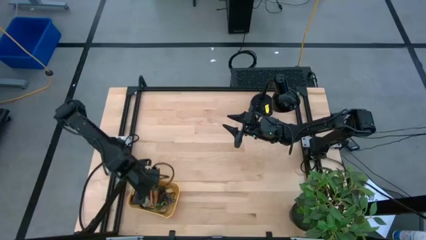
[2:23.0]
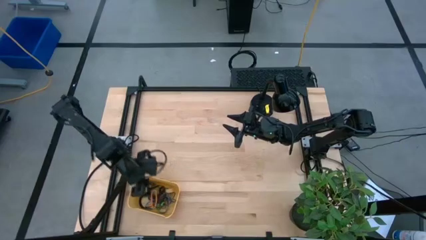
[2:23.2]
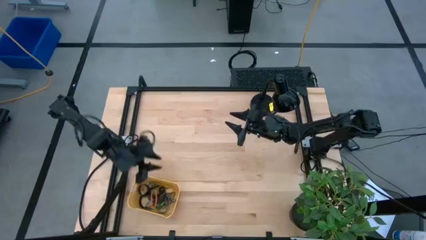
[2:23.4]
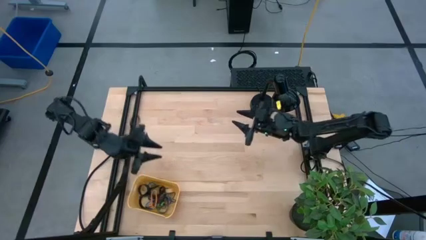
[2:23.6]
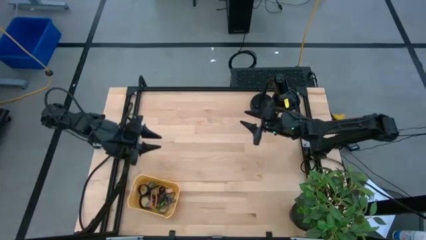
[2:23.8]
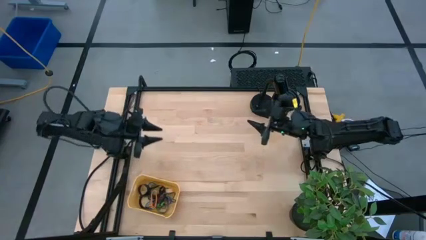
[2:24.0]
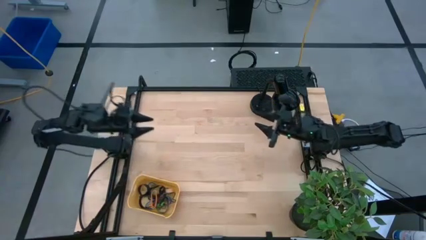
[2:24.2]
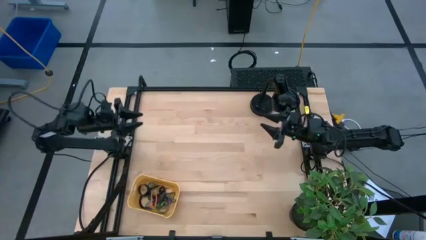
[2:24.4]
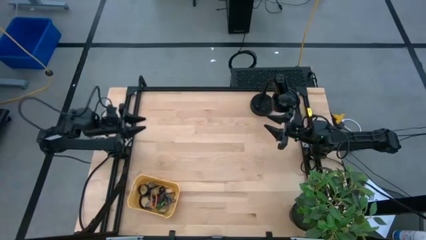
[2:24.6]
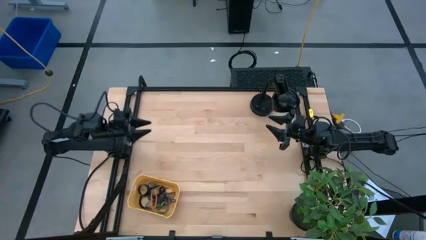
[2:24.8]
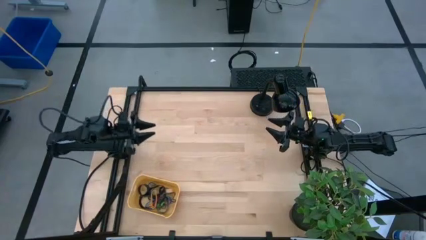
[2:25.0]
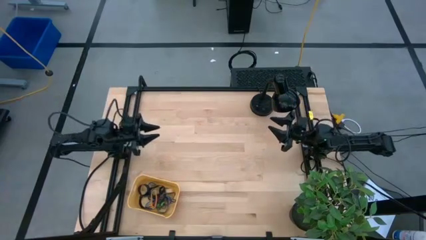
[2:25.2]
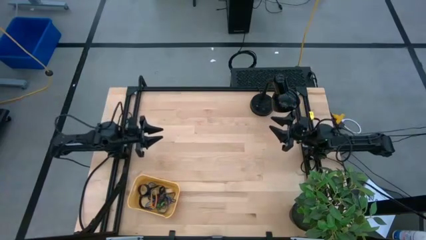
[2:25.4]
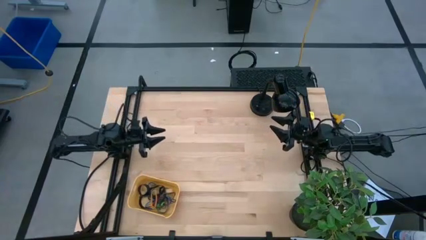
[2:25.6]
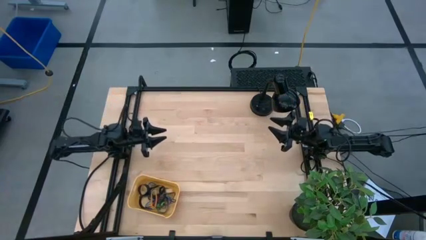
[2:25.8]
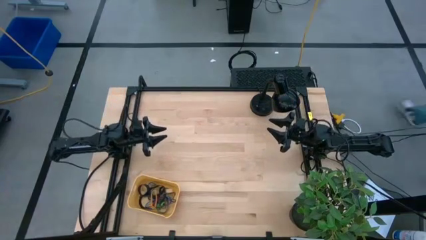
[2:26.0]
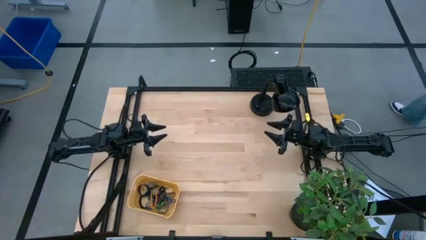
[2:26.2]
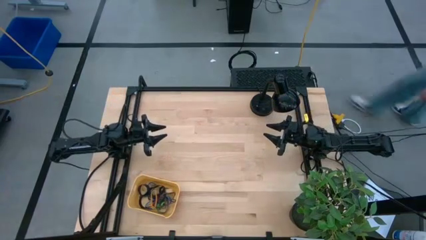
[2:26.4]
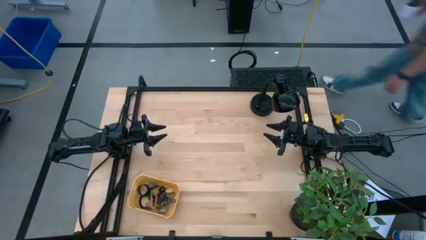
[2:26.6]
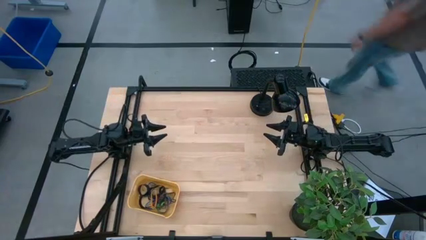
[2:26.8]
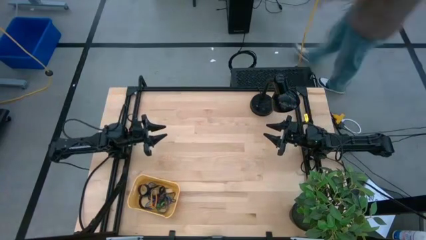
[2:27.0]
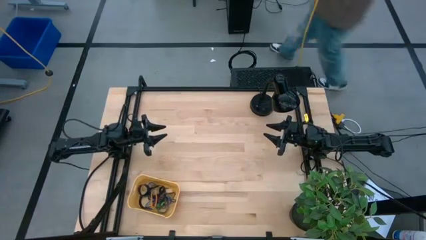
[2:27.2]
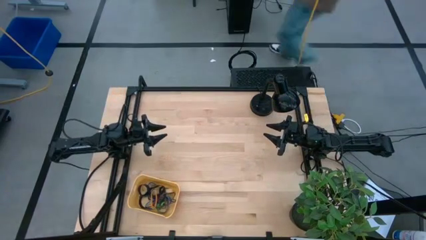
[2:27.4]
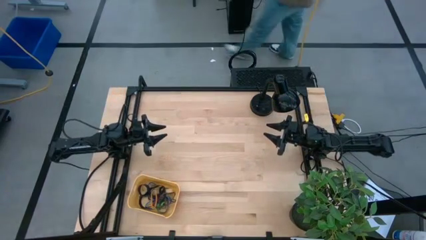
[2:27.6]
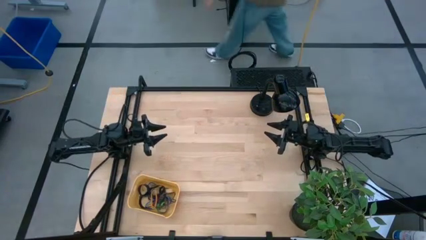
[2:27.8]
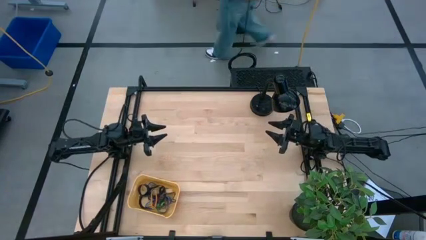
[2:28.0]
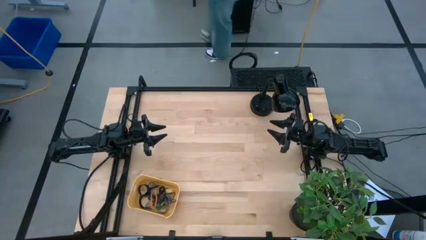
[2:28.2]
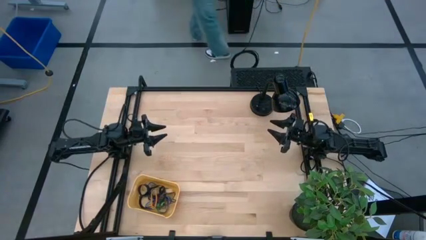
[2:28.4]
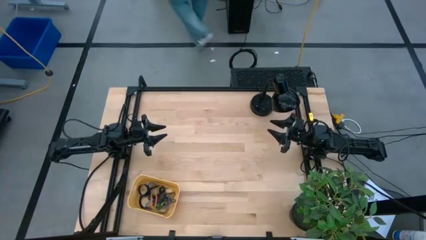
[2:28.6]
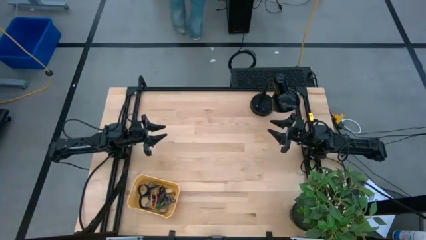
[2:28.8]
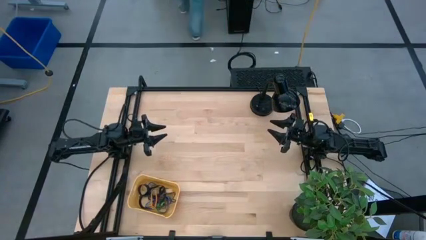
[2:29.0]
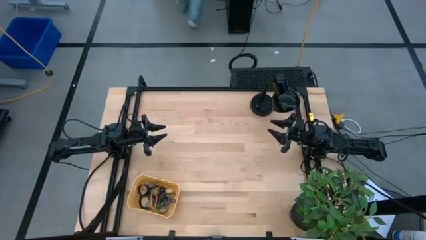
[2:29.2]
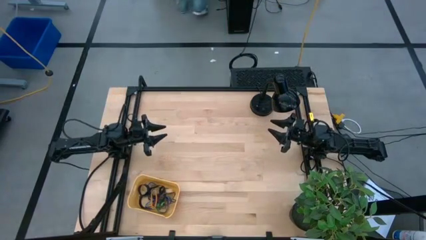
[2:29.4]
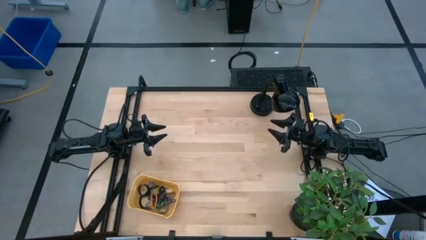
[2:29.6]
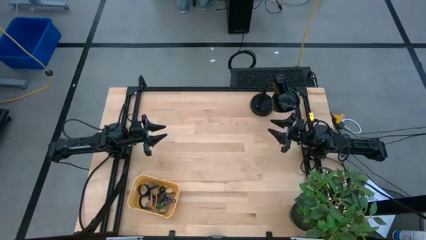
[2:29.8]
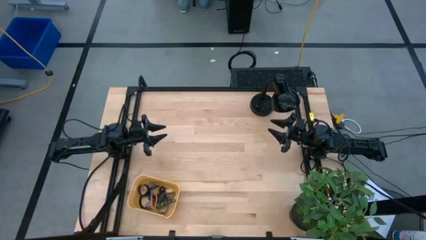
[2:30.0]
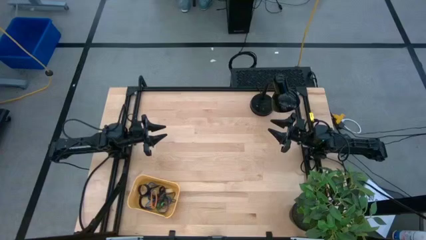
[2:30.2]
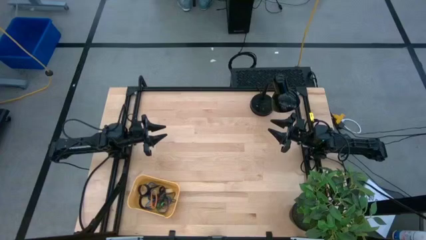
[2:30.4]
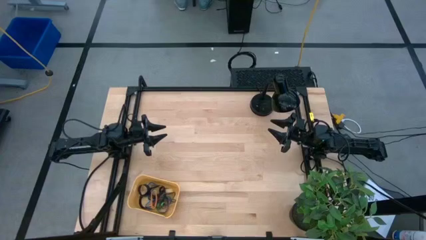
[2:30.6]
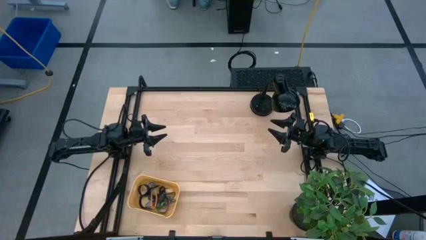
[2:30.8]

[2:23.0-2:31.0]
Task: Pick and place rubber bands into bin
Return to Home Position

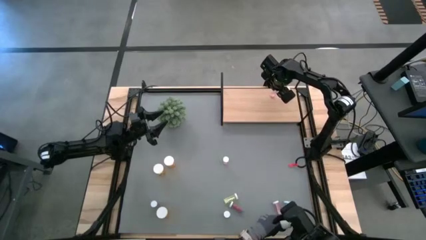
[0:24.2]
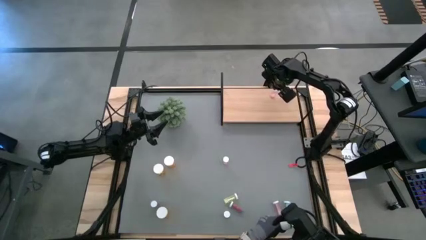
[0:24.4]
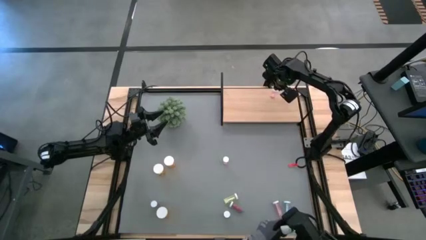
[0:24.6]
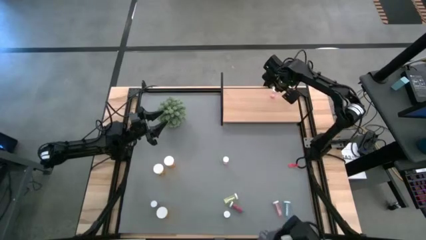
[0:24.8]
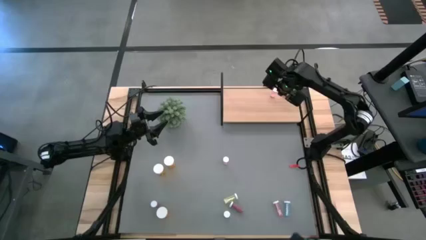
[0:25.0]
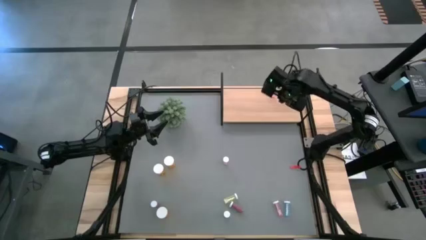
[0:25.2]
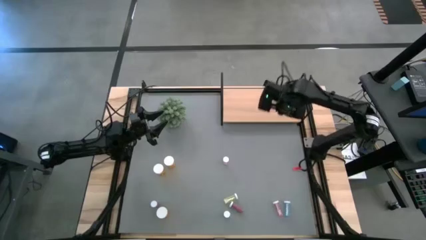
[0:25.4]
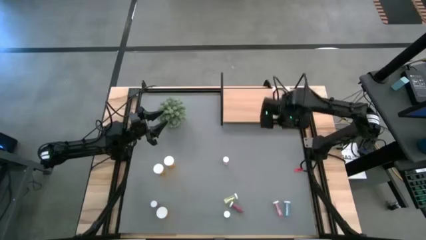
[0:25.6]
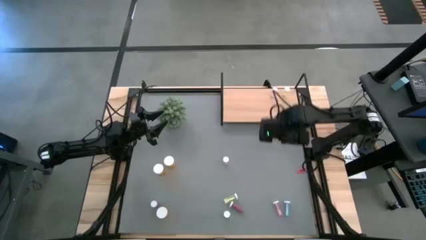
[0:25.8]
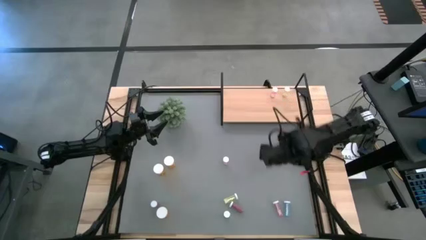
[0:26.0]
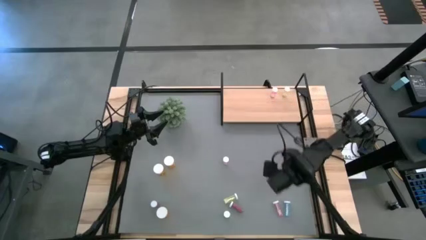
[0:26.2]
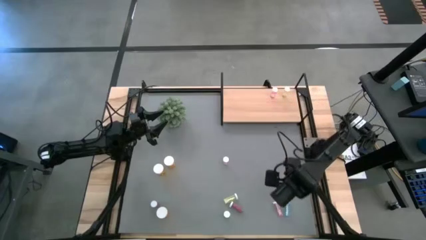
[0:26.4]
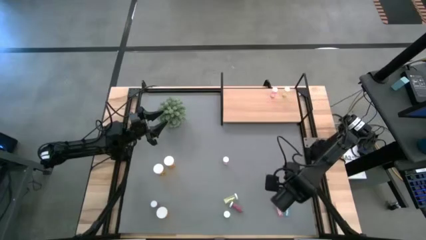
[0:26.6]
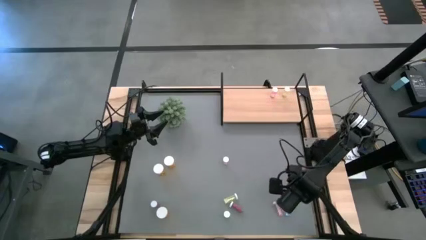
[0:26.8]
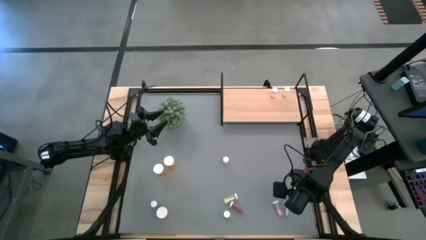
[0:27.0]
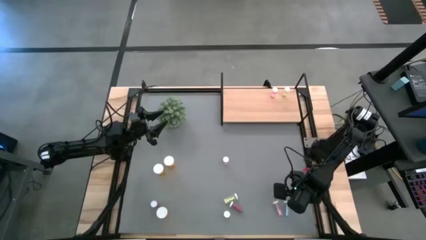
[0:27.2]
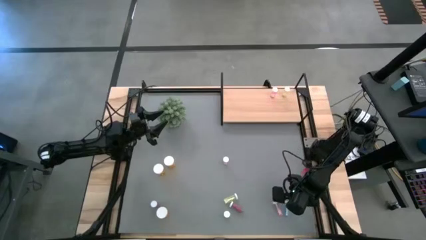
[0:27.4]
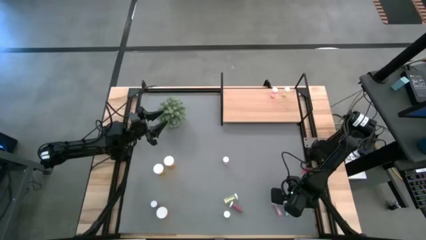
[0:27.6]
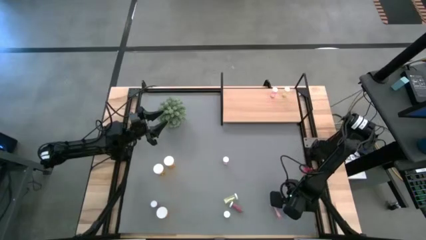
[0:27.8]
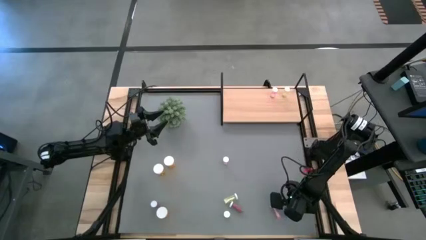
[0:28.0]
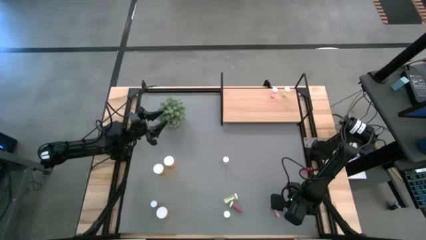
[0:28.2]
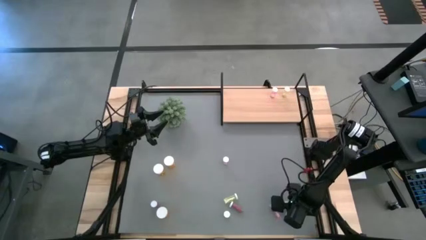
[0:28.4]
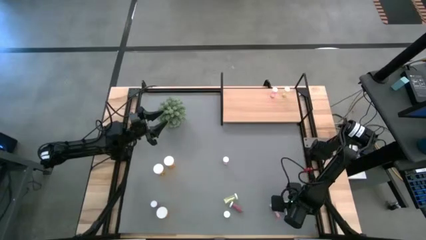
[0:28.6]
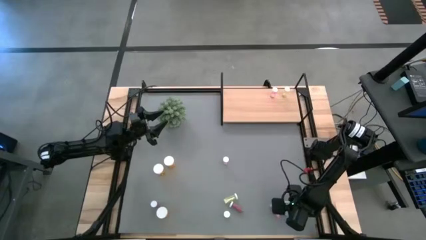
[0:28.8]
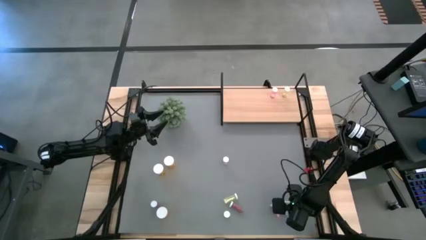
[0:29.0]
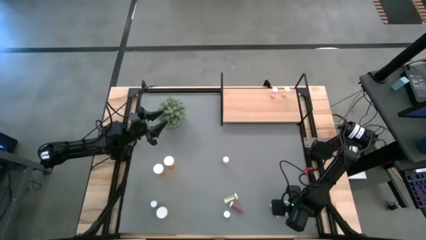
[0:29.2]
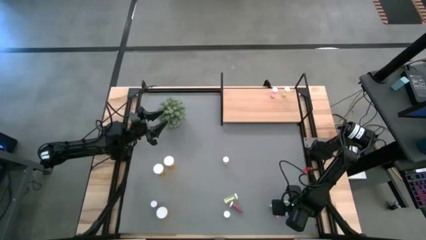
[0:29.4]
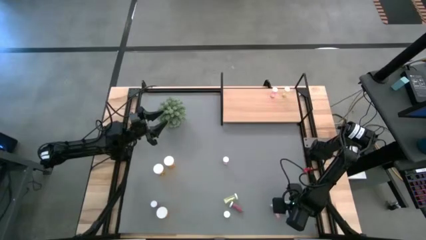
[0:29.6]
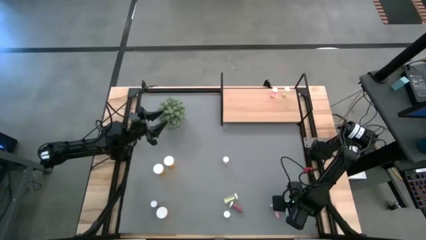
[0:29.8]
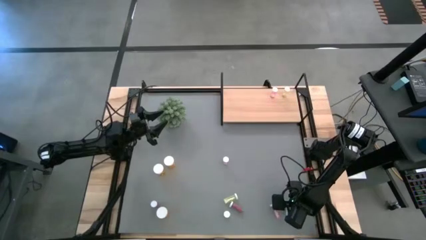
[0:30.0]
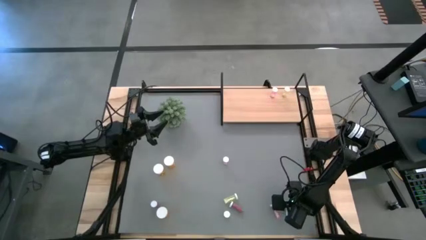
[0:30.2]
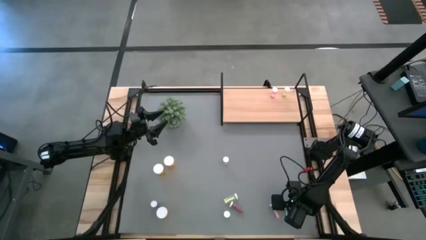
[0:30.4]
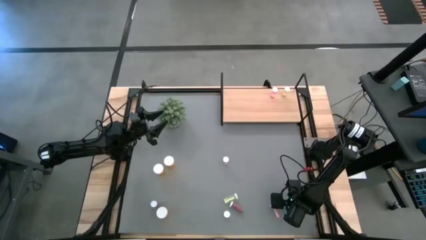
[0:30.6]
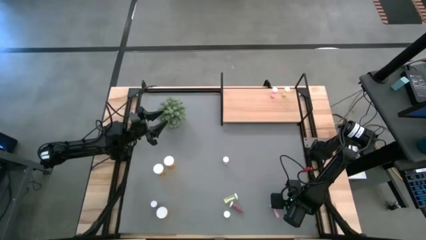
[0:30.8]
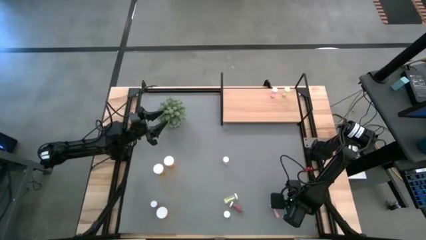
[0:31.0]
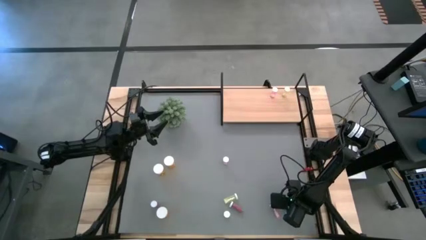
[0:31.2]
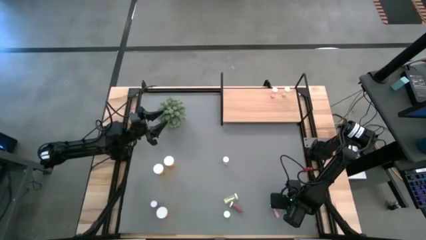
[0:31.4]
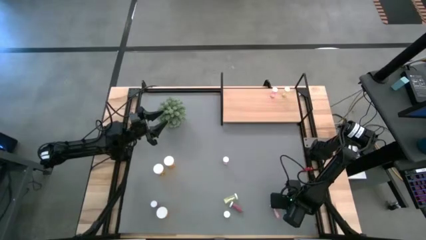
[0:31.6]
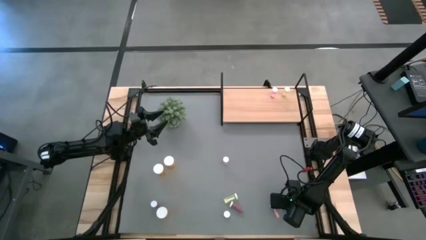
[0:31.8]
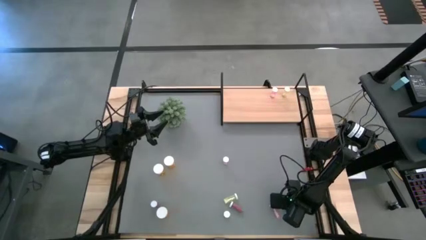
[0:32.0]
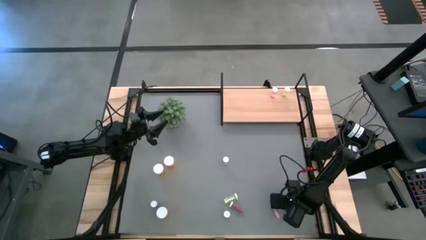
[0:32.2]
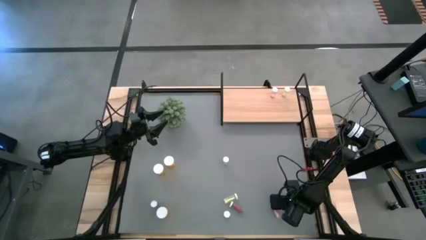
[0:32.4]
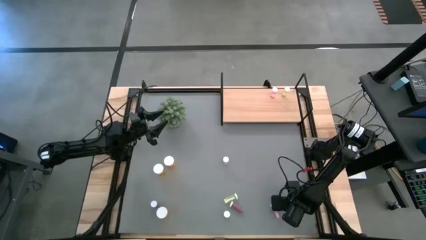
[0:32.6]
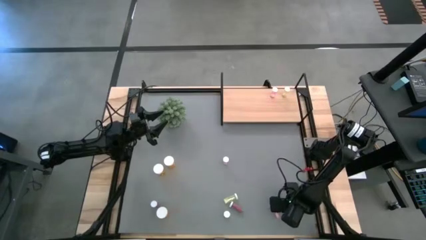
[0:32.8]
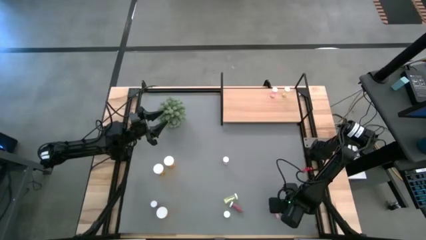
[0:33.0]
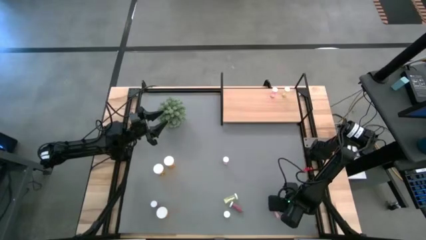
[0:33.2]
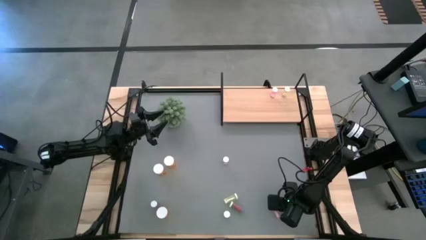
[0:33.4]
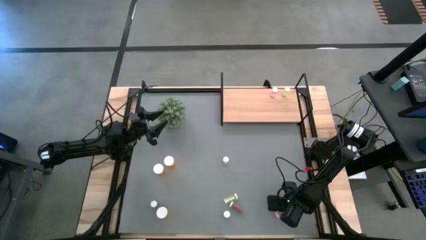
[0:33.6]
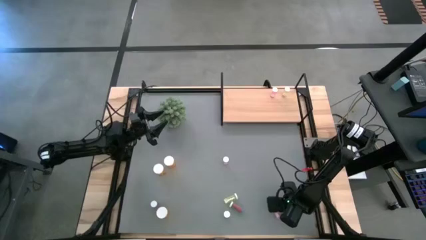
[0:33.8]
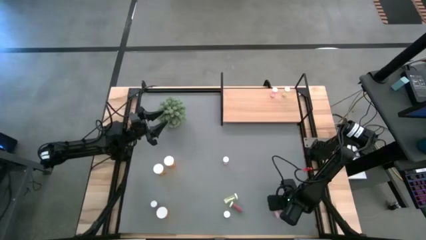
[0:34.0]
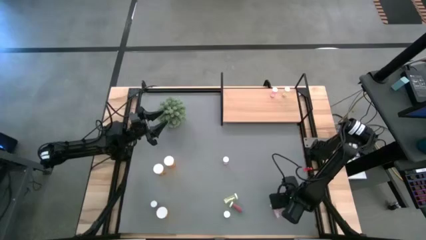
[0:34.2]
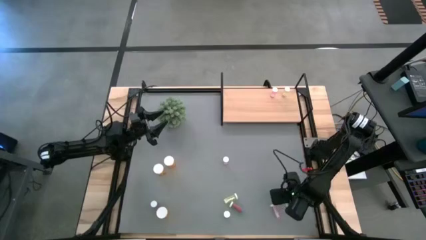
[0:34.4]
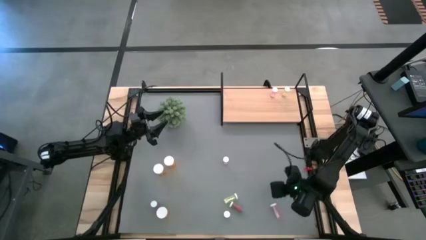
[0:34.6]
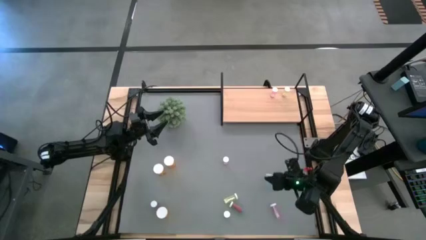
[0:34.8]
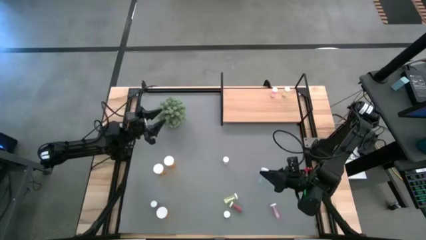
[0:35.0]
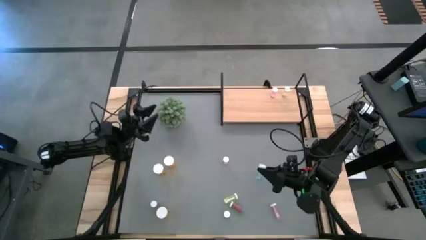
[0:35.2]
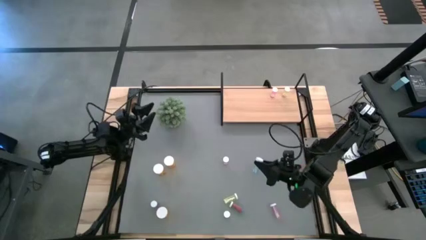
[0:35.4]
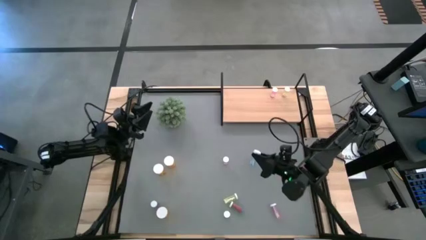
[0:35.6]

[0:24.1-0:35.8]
Task: Pick and place medicine bottles onto shelf by color
Put the bottom right blue pill bottle on the shelf
